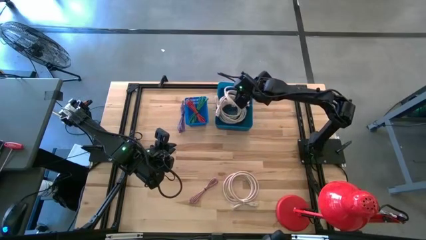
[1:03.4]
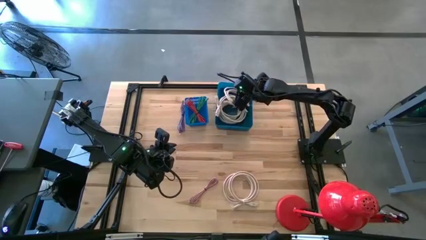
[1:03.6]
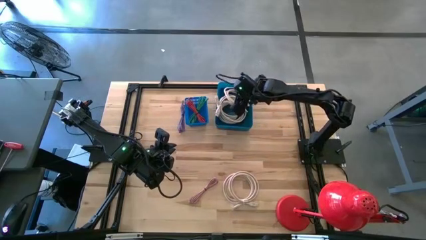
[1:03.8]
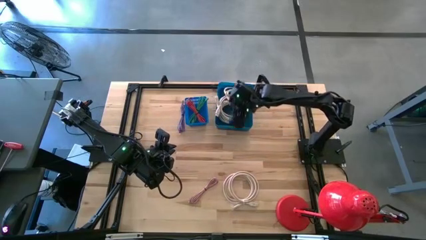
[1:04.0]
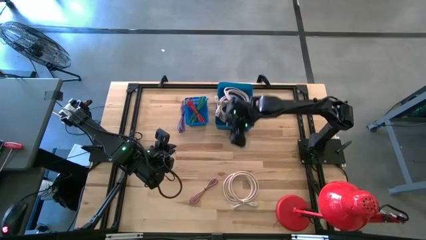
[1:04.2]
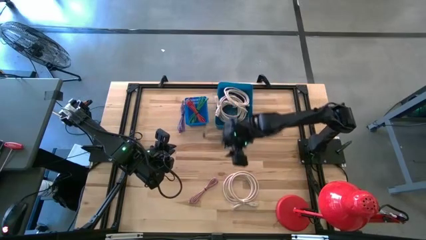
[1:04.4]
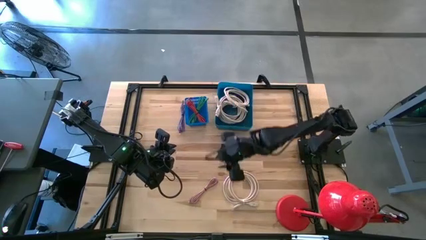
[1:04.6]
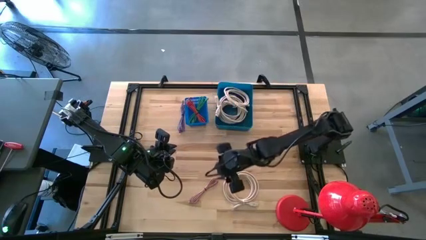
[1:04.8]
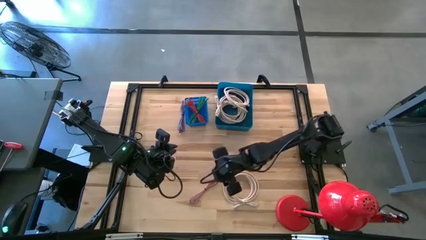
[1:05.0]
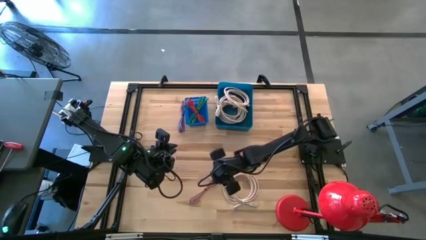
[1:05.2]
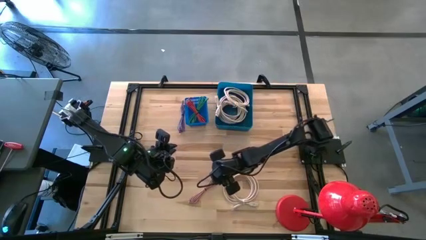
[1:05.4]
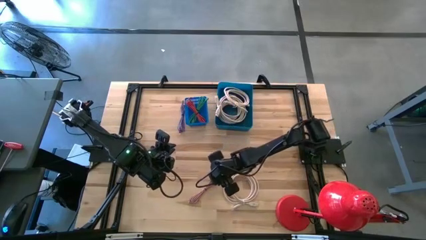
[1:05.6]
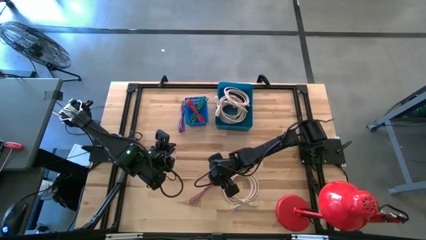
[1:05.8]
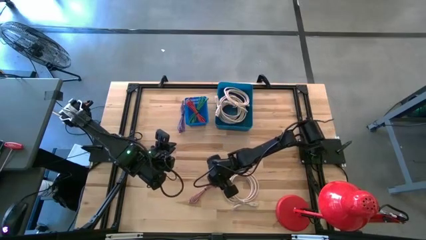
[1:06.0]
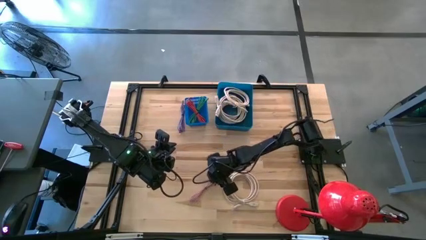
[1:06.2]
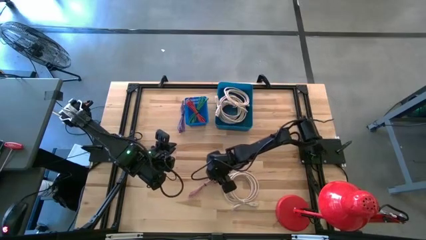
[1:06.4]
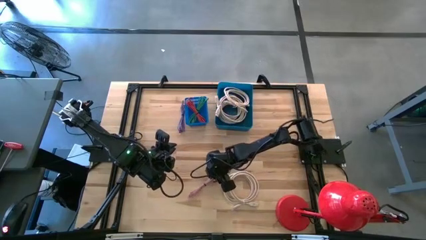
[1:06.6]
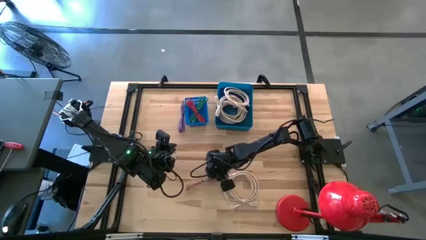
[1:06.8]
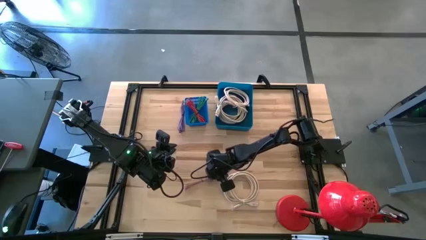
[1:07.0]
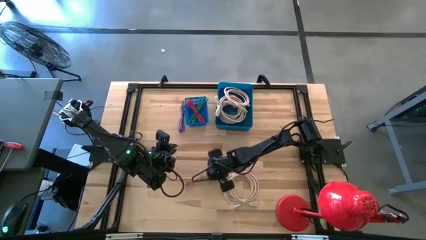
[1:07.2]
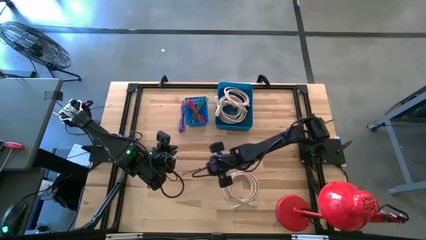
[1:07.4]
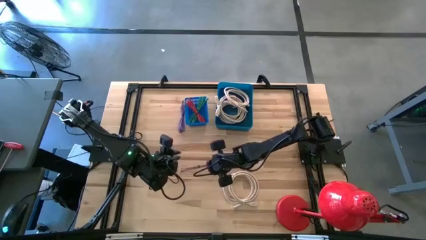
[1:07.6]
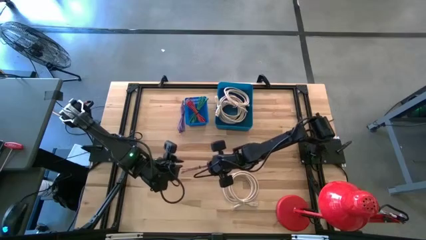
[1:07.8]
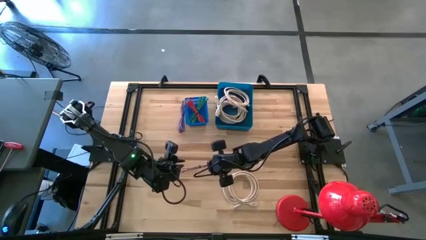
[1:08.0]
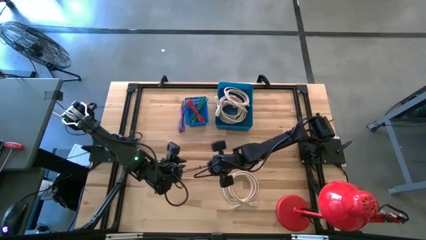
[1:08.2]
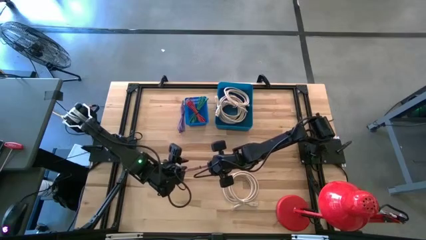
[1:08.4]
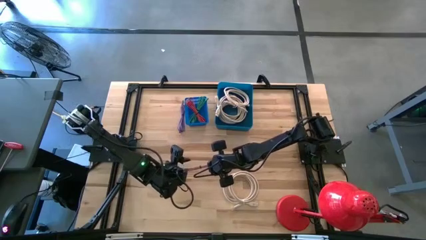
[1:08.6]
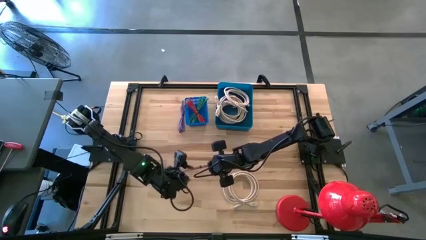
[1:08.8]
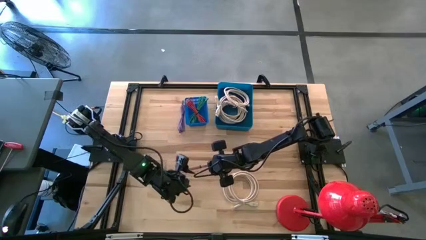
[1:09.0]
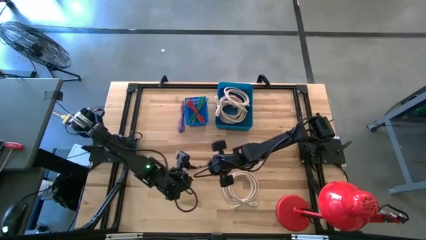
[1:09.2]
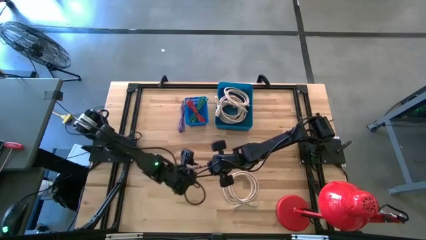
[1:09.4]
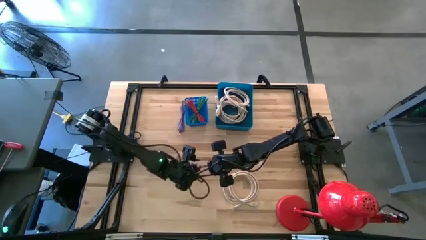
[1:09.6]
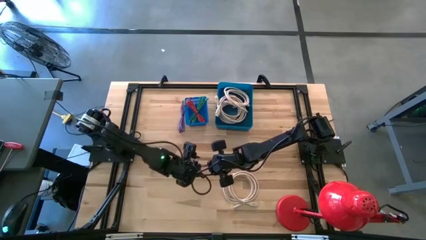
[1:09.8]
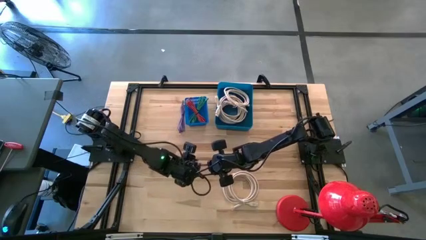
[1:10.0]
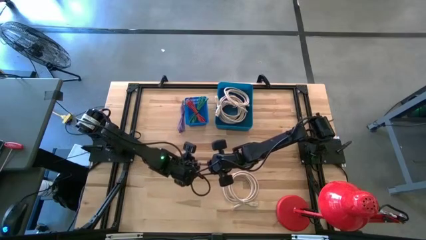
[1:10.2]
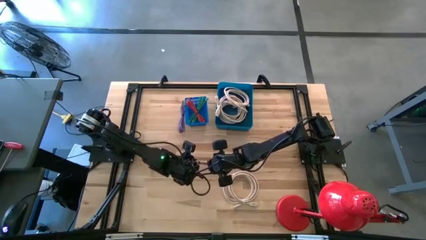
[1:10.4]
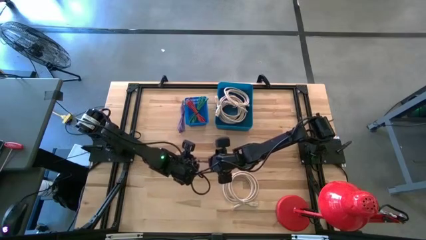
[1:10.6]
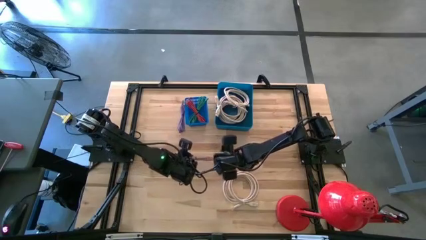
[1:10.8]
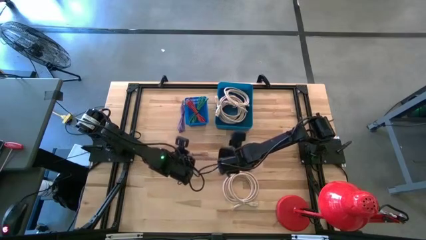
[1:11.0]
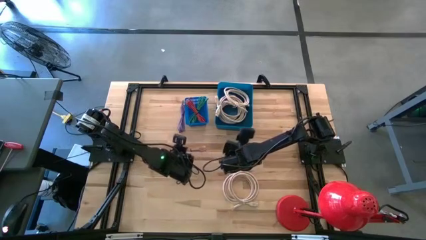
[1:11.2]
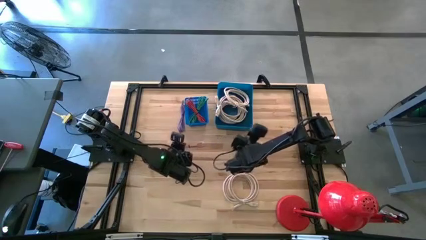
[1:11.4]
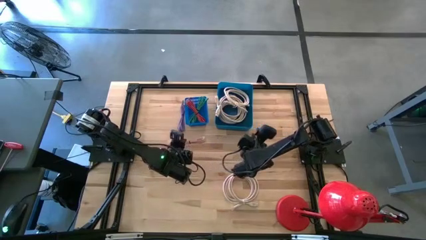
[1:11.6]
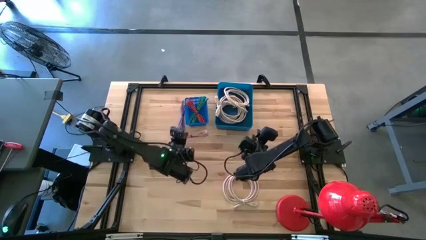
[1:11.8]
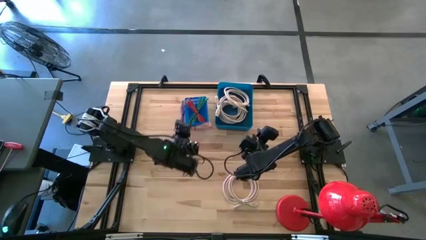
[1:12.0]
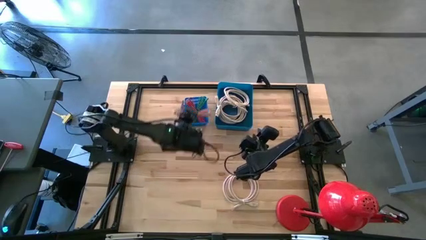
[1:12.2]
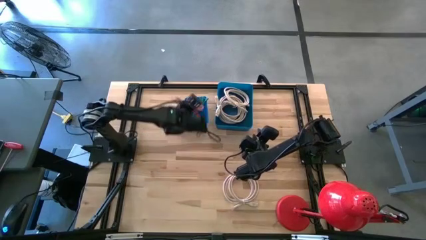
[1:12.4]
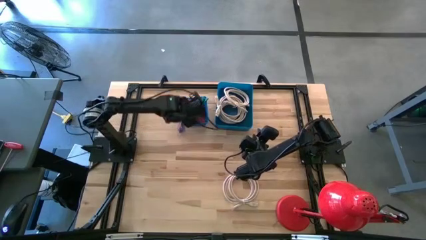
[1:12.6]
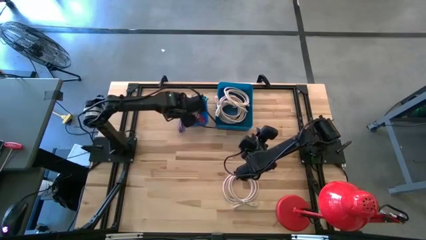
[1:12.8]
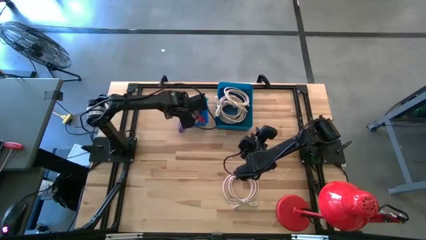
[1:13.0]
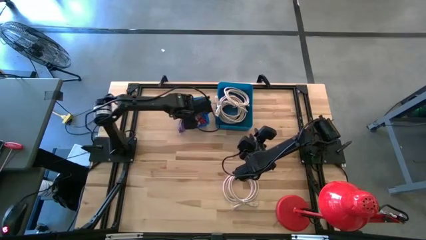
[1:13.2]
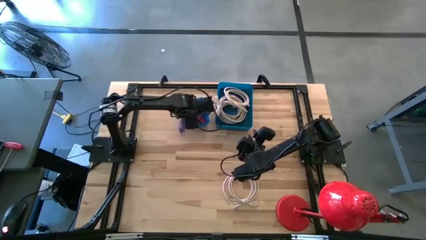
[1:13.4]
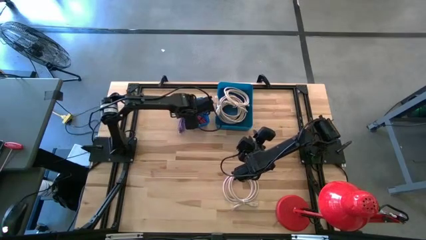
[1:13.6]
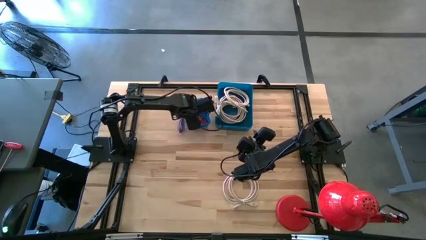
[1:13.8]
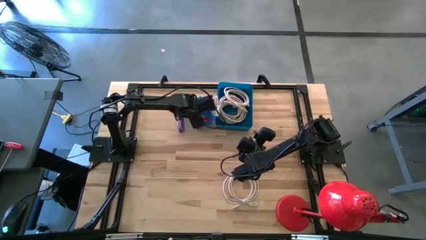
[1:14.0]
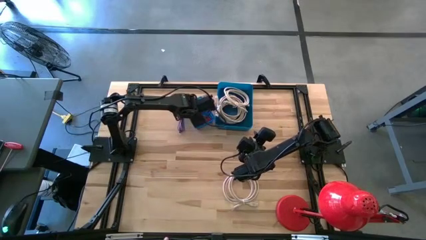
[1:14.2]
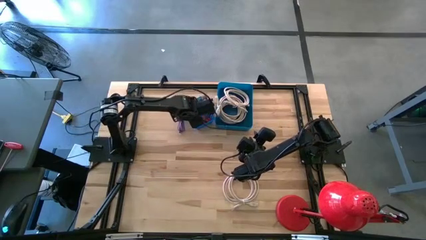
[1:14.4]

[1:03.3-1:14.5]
Task: Pick & Place USB Port
Put the pink charger cable into the blue bin

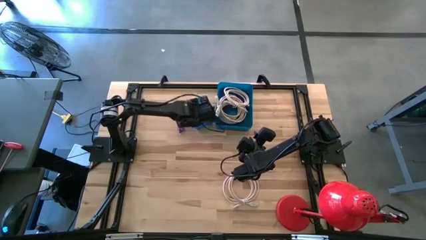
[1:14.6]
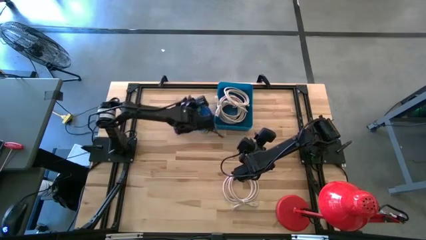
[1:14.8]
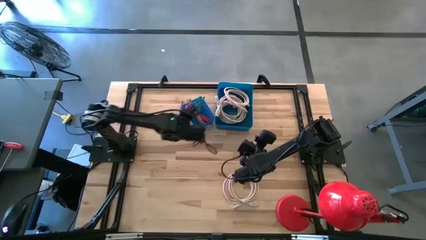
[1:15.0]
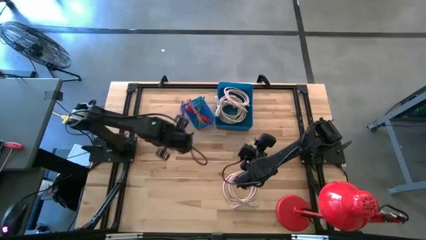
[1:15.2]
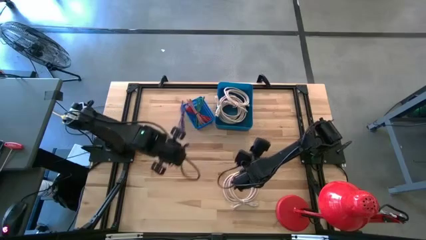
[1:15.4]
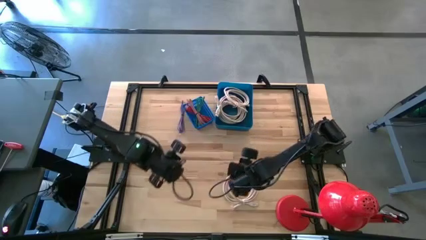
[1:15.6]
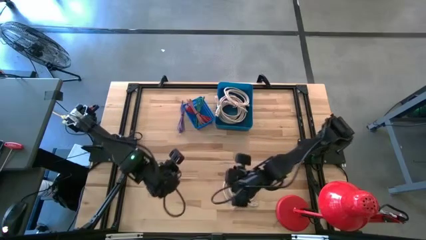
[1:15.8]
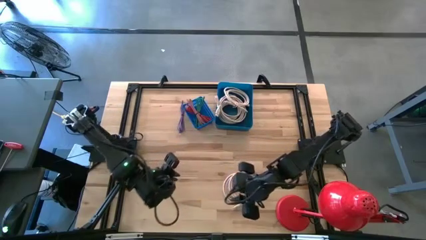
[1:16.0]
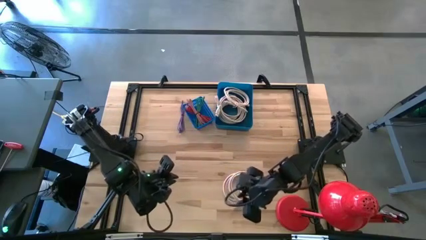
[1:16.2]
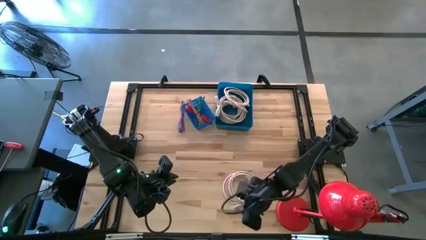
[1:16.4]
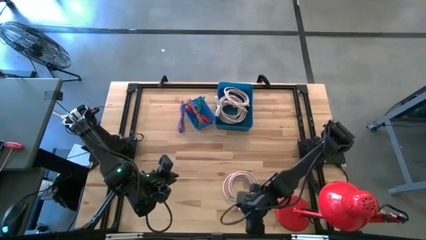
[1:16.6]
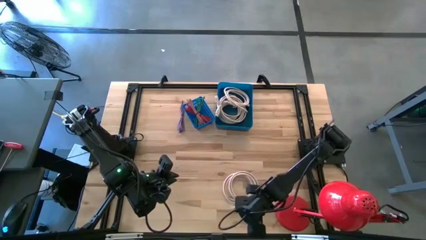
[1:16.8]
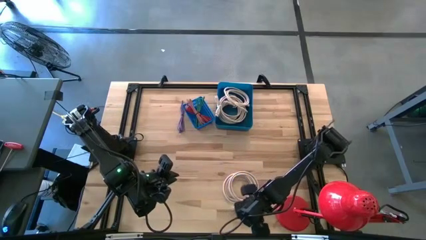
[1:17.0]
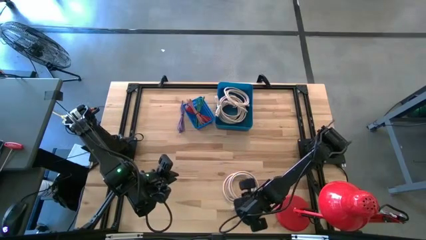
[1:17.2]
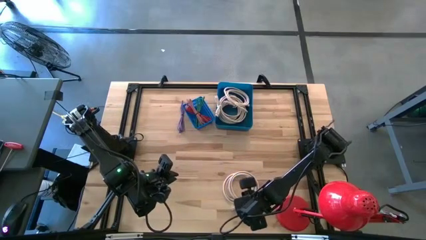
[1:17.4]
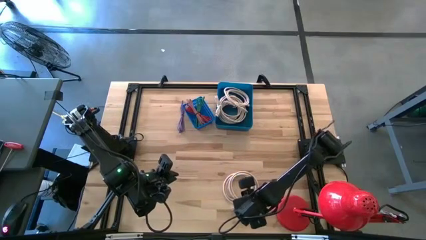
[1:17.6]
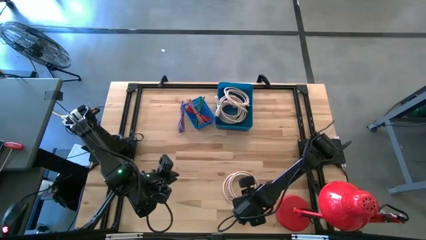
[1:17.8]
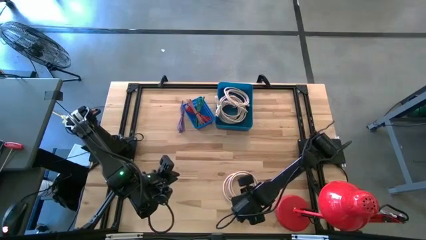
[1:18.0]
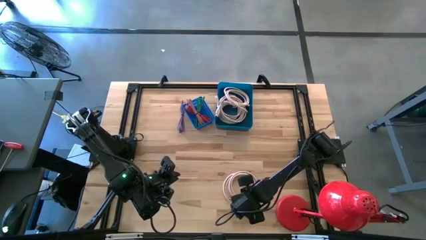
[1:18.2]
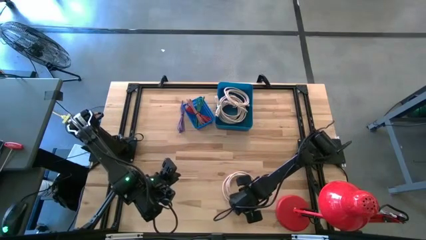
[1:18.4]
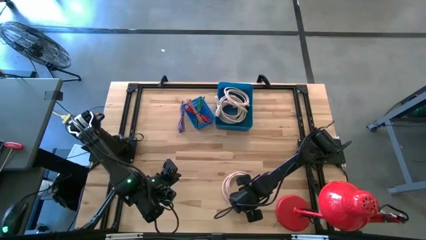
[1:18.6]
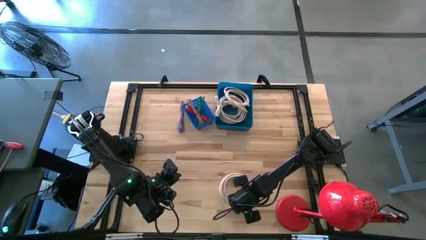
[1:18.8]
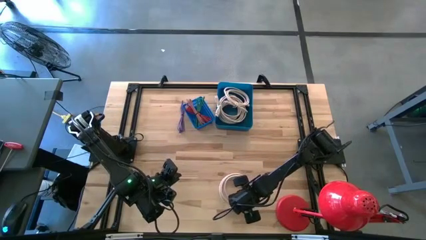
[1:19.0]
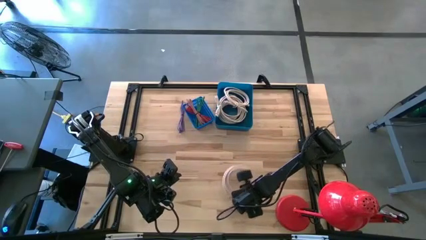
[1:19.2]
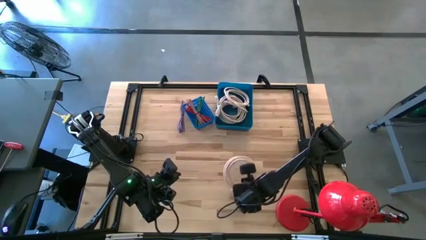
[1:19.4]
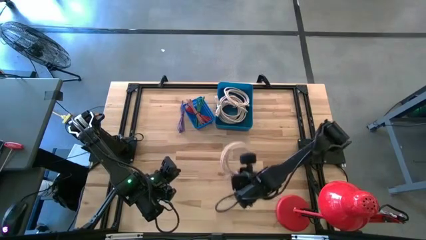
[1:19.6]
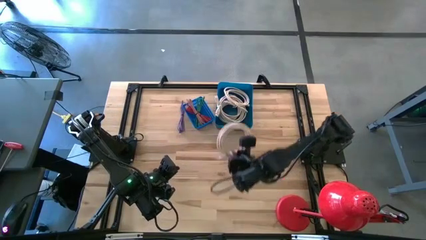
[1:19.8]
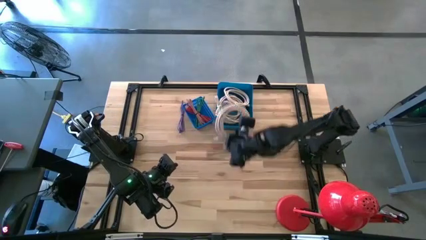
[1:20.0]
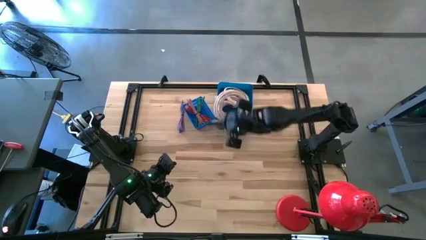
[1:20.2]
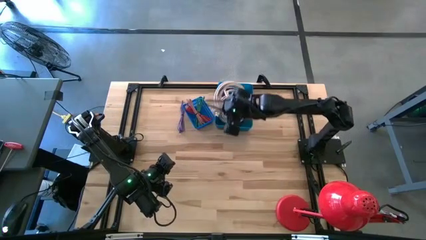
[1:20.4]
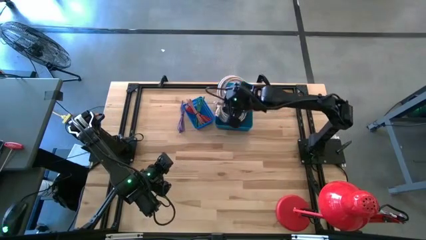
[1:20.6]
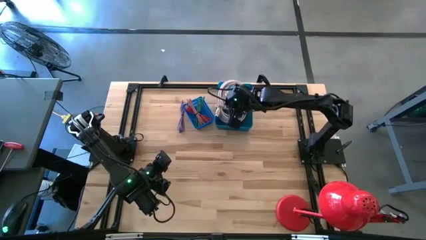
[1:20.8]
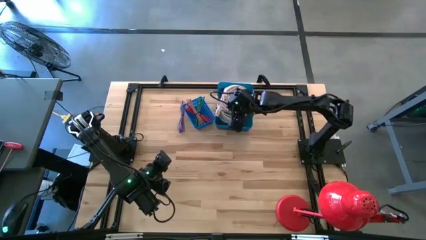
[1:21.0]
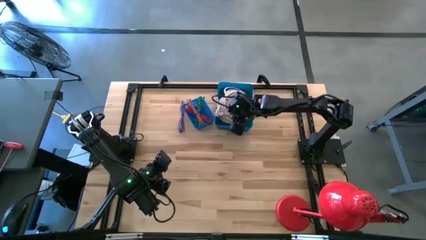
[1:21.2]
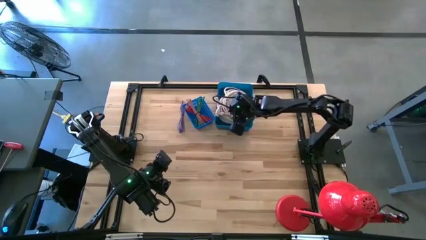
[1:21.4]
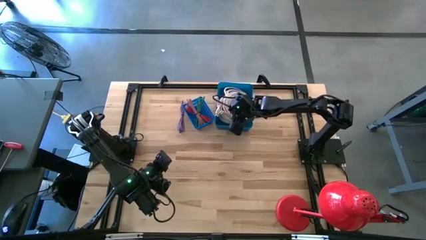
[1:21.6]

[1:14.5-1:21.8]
Put the white HDMI cable into the dark blue bin
